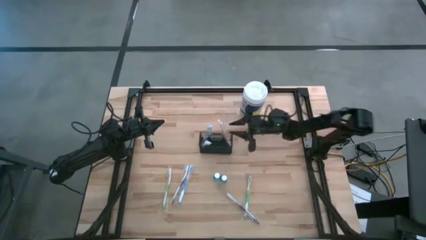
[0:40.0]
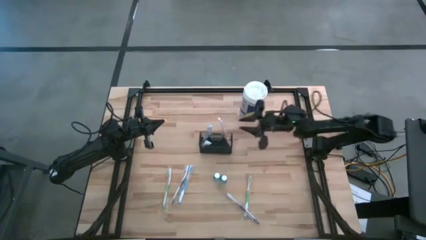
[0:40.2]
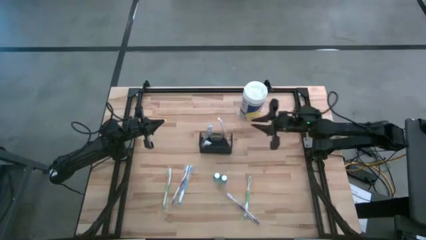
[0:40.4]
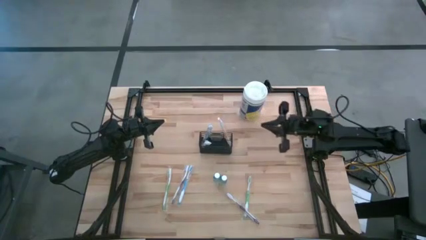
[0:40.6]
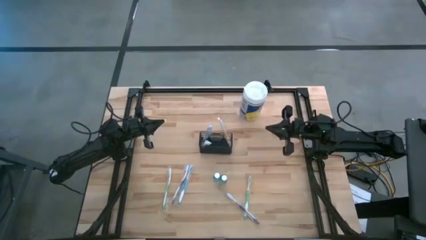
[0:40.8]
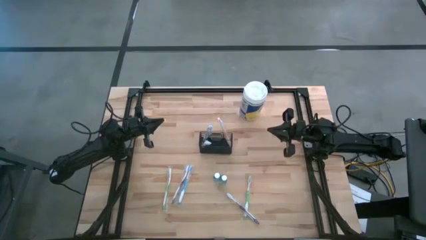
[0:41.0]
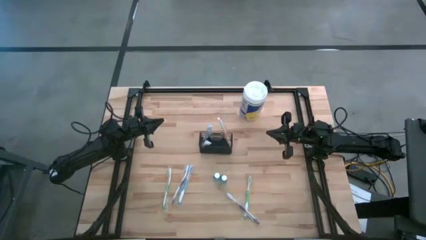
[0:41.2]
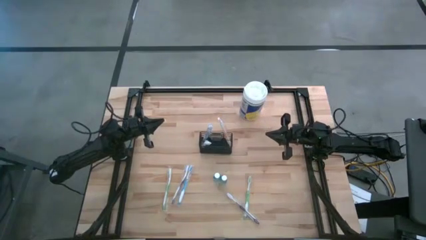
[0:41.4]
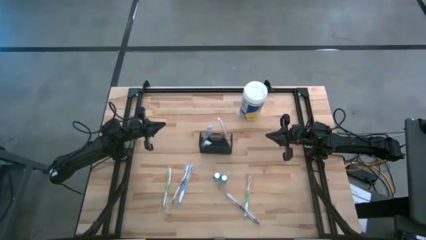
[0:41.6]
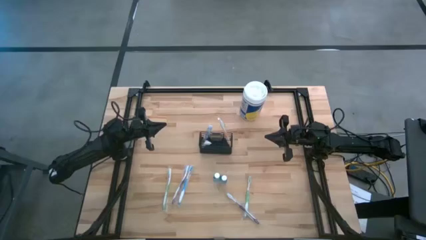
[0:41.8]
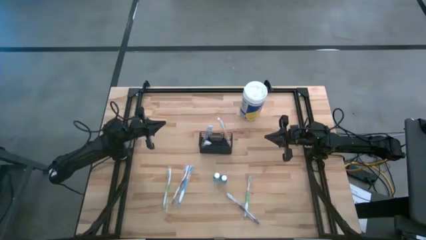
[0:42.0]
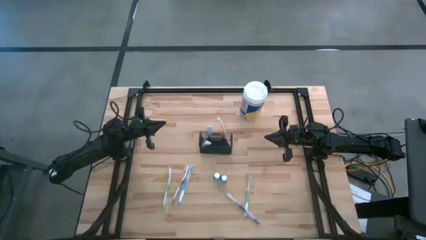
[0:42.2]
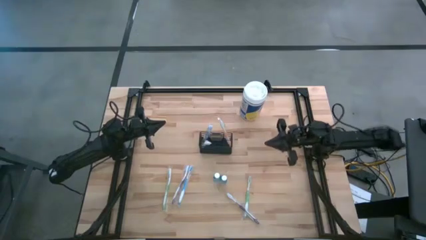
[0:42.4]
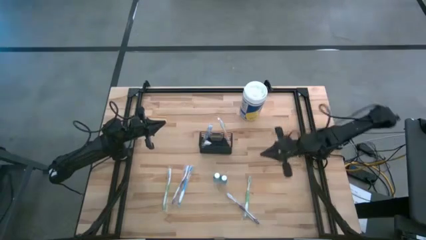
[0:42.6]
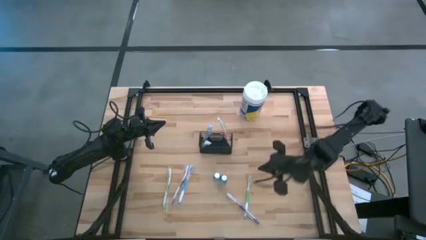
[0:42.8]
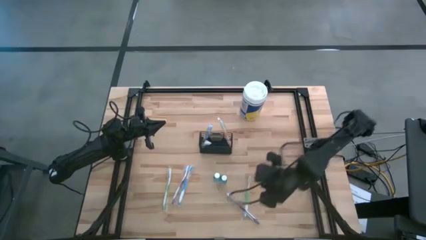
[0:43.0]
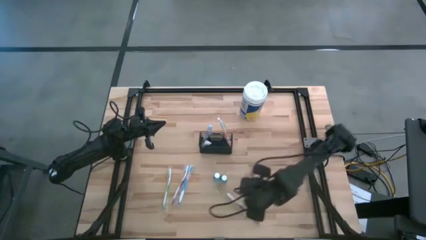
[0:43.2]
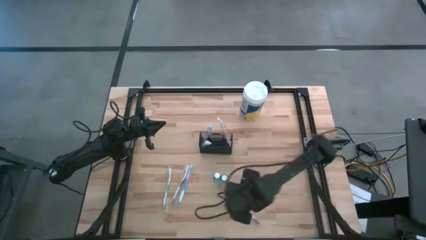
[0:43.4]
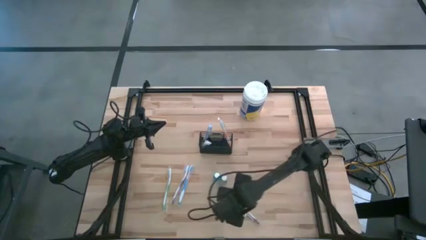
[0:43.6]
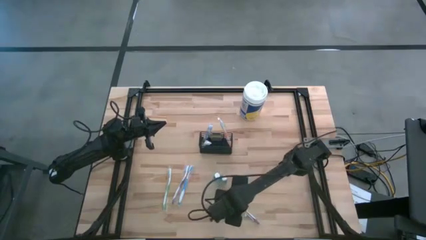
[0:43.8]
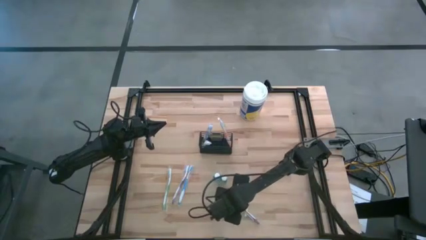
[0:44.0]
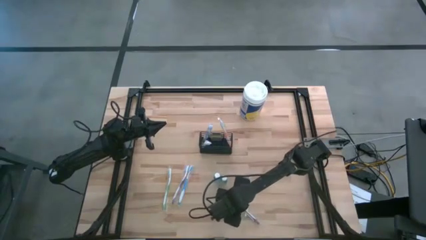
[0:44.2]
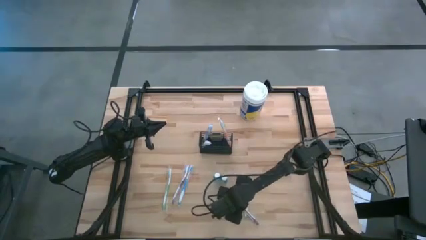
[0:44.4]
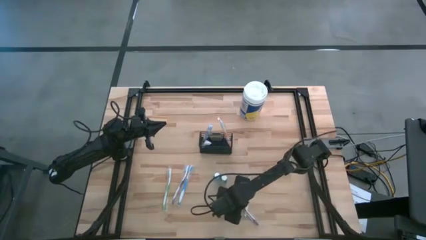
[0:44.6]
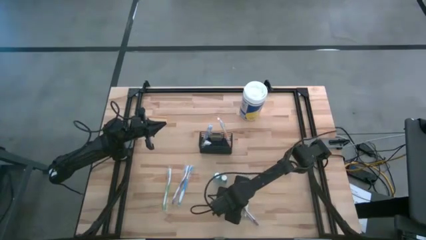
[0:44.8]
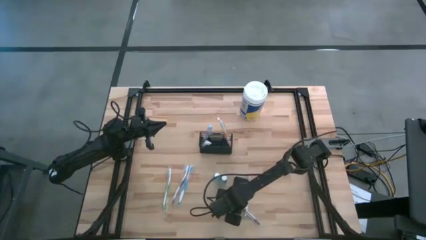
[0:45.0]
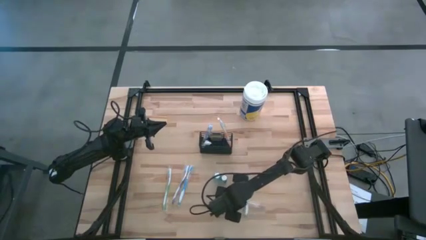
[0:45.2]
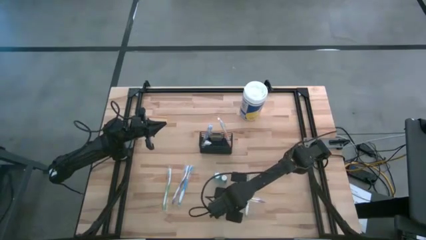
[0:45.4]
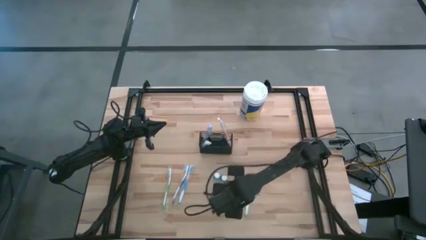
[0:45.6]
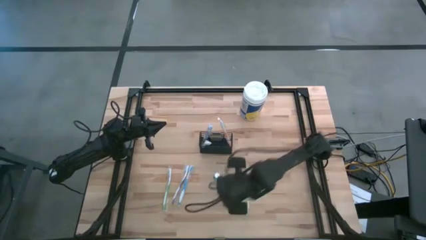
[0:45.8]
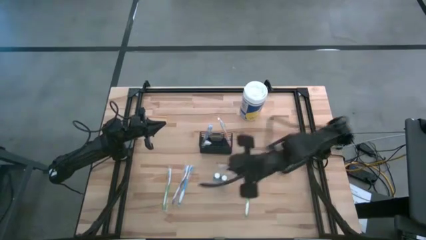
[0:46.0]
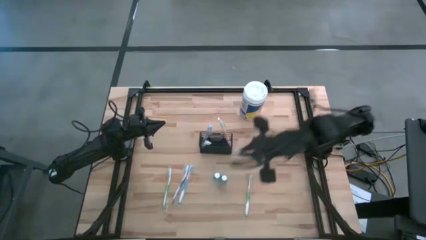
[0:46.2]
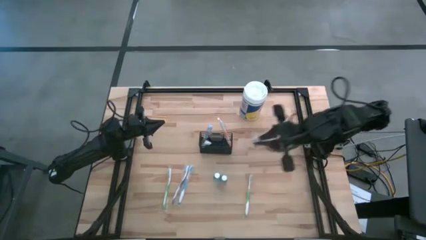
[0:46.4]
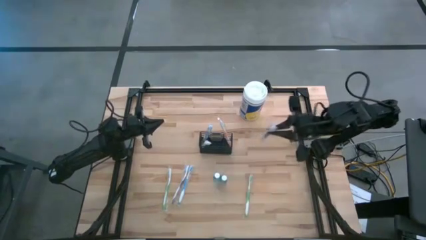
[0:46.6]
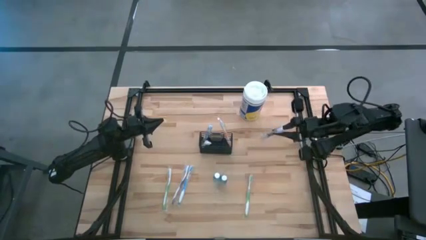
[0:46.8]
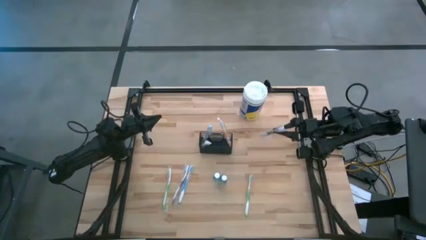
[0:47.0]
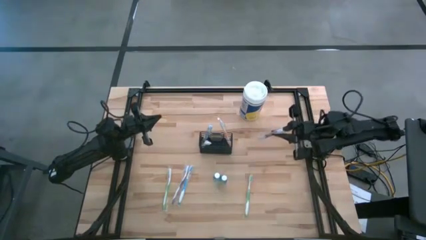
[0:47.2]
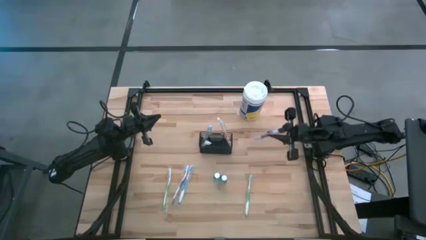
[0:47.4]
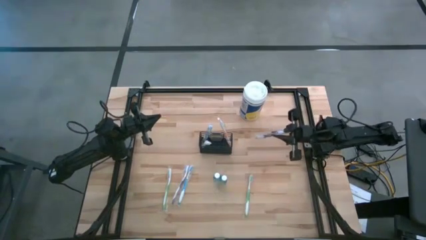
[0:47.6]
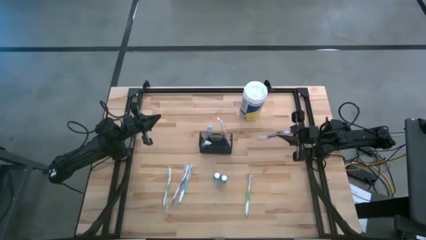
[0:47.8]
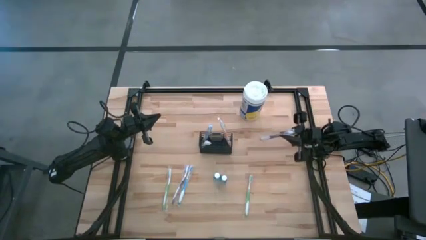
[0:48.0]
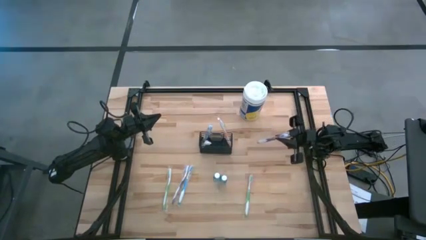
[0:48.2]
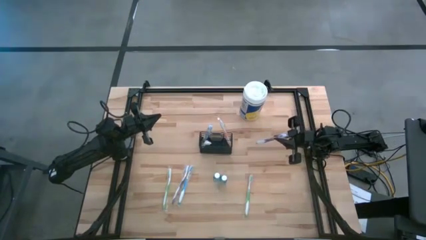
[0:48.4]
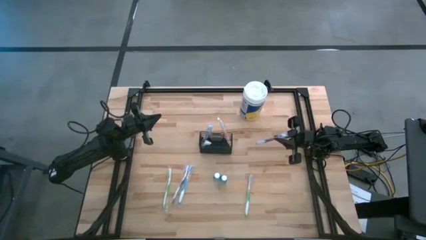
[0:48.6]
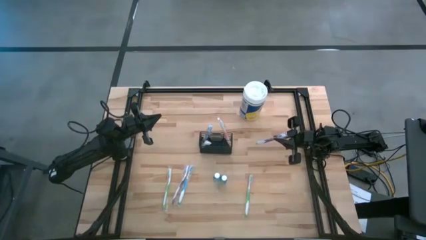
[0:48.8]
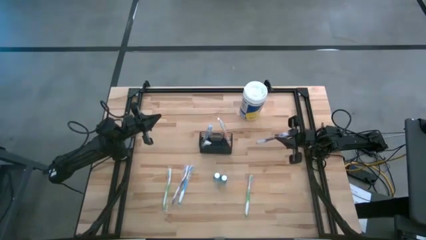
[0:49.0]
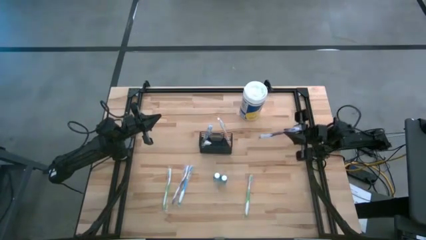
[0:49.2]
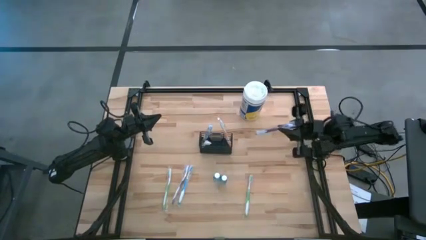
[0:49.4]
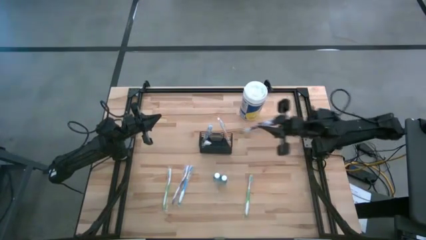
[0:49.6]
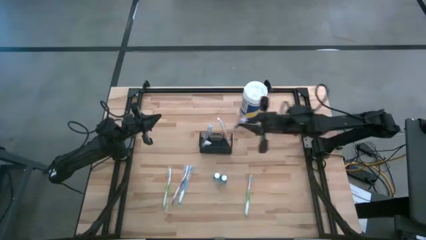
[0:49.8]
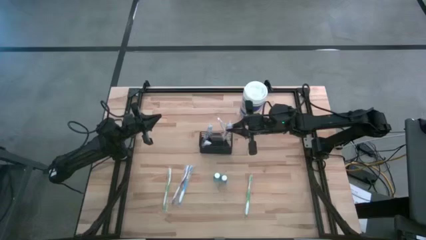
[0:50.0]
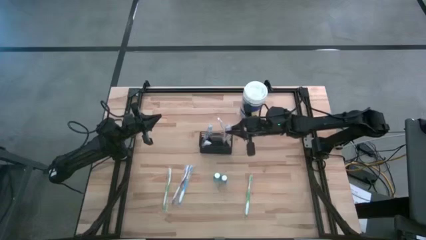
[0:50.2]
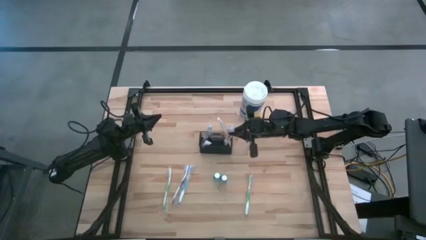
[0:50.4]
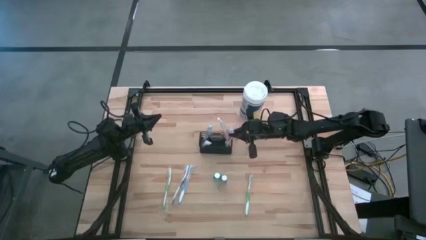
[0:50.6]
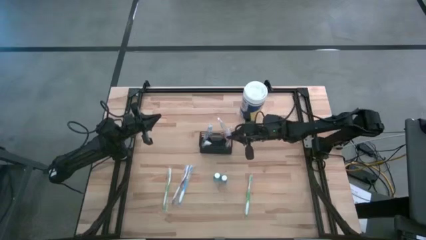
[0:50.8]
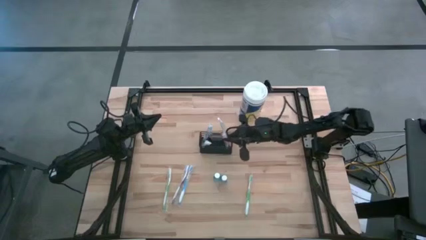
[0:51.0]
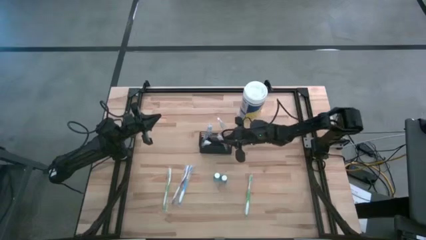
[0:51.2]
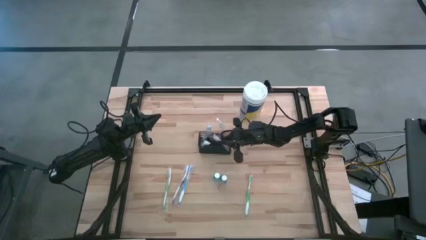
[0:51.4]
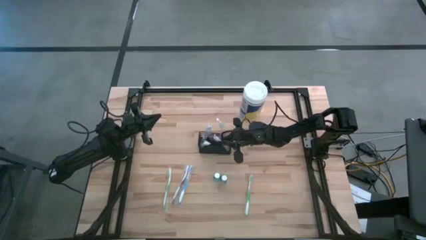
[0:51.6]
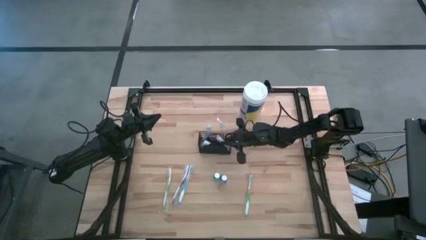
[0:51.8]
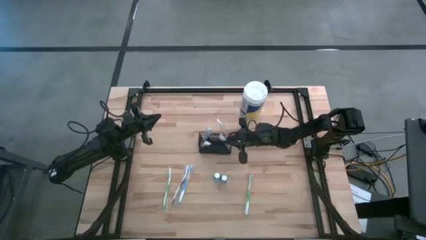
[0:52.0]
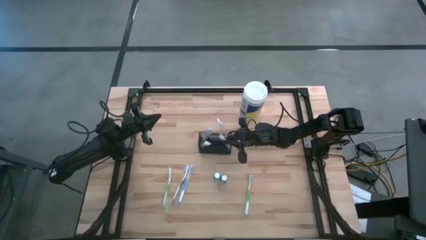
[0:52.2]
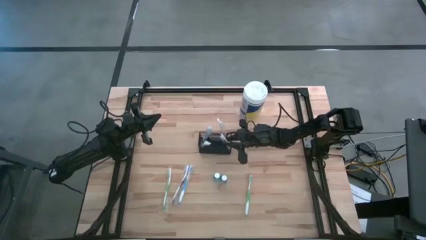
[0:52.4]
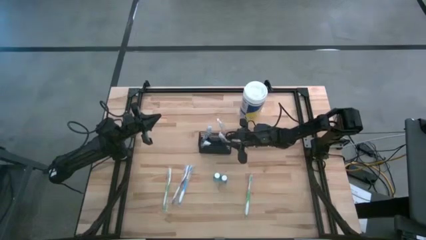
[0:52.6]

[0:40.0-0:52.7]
Task: Pick & Place toothbrushing station
Put the purple toothbrush into the black wire organizer
